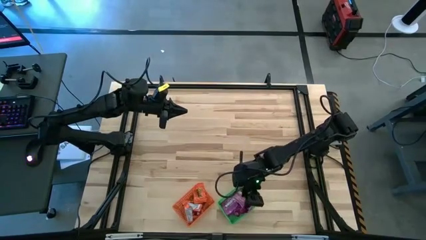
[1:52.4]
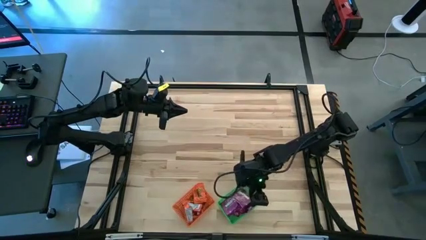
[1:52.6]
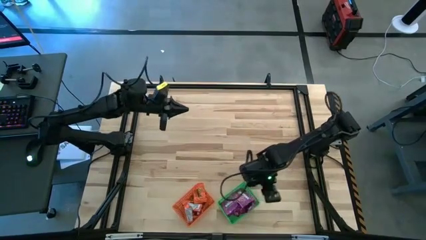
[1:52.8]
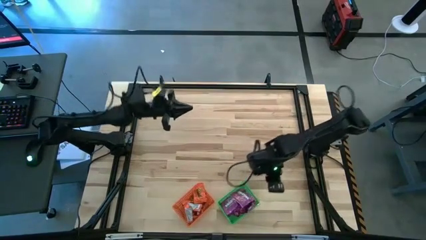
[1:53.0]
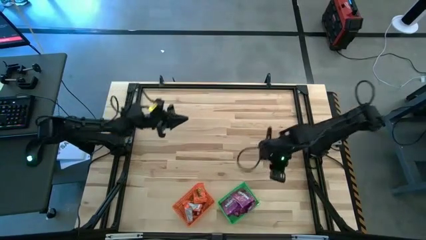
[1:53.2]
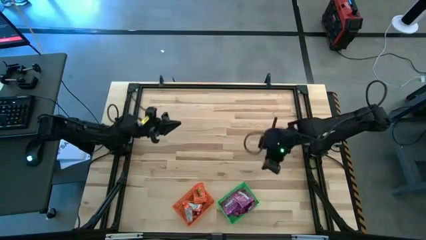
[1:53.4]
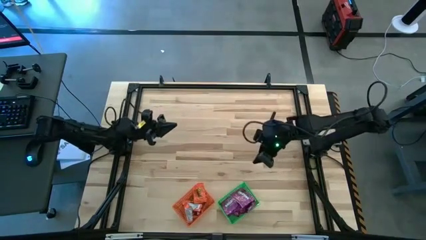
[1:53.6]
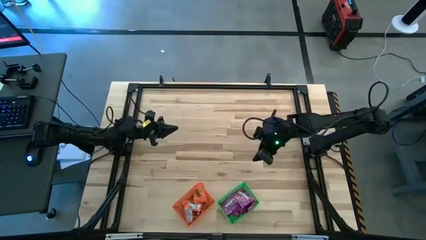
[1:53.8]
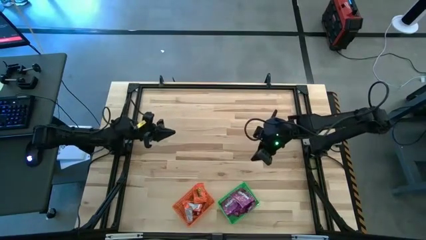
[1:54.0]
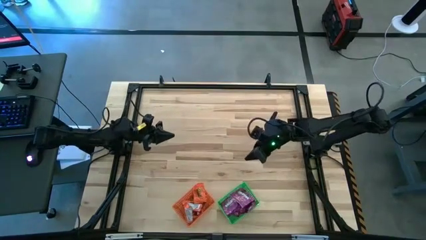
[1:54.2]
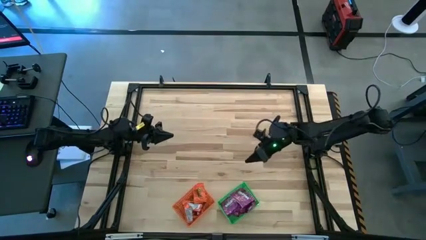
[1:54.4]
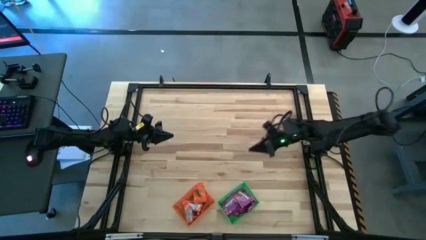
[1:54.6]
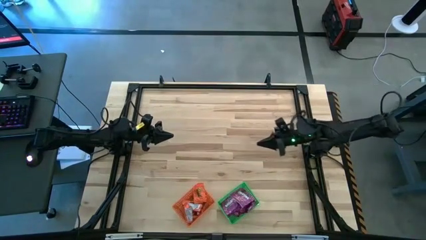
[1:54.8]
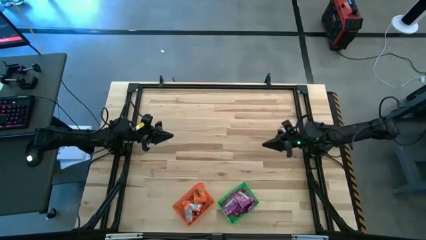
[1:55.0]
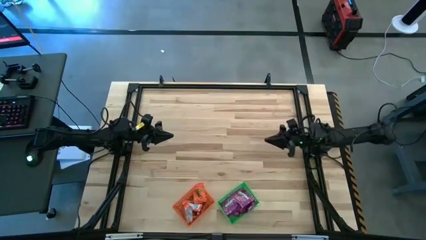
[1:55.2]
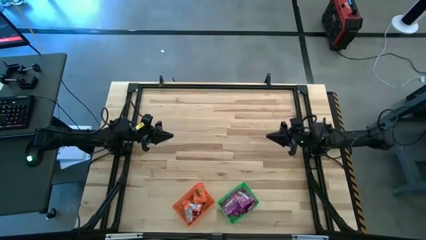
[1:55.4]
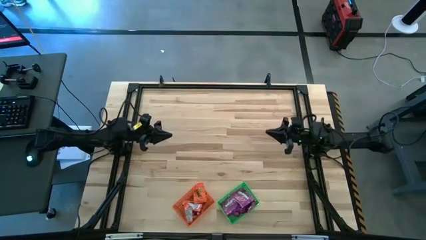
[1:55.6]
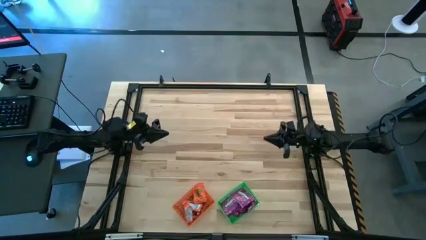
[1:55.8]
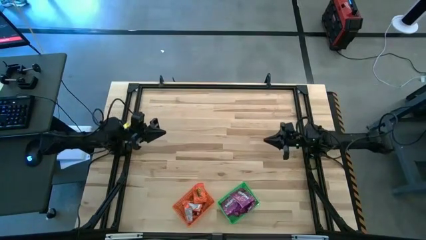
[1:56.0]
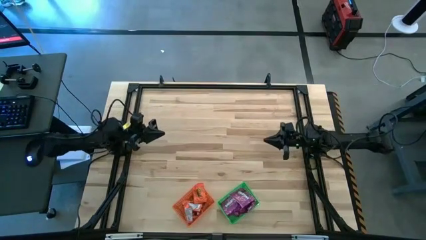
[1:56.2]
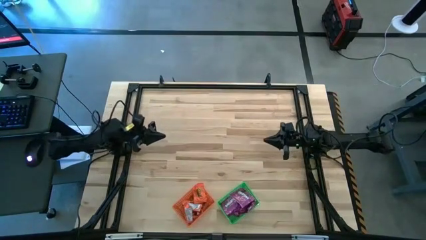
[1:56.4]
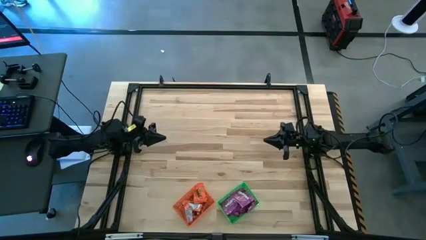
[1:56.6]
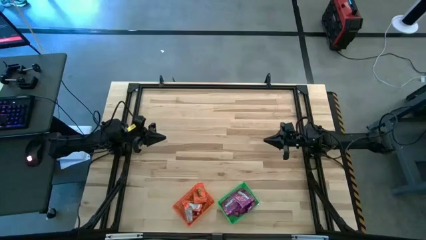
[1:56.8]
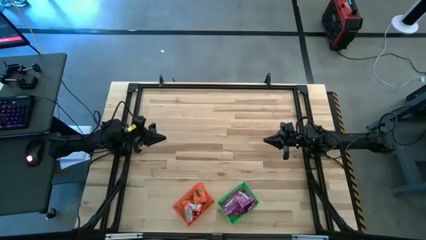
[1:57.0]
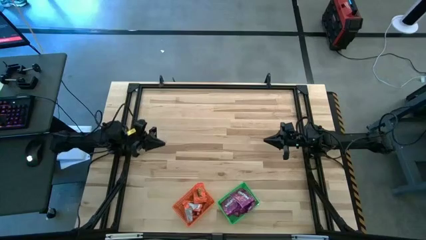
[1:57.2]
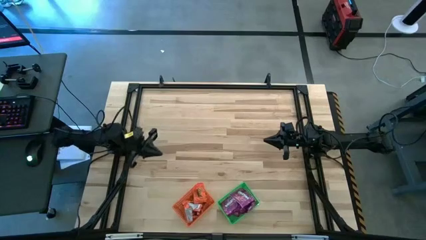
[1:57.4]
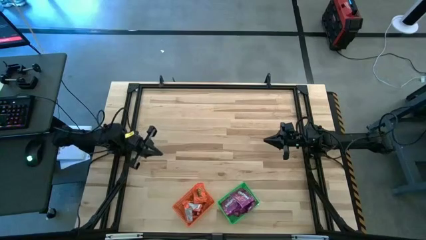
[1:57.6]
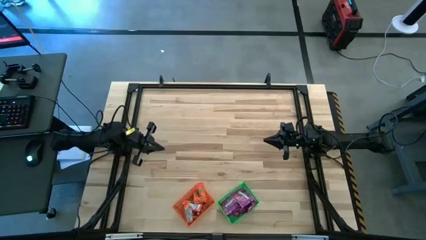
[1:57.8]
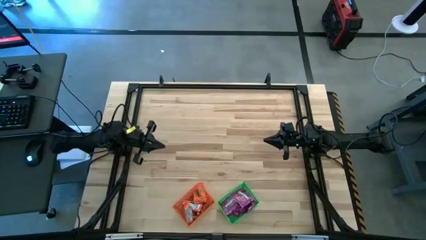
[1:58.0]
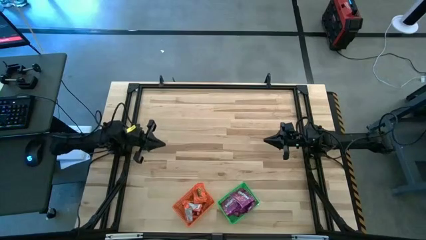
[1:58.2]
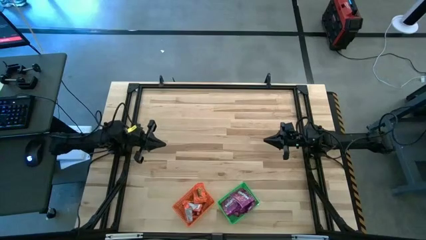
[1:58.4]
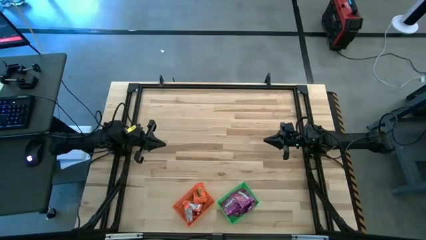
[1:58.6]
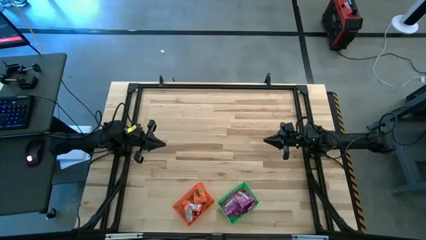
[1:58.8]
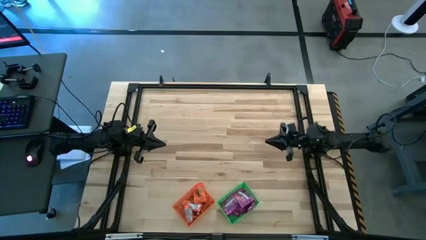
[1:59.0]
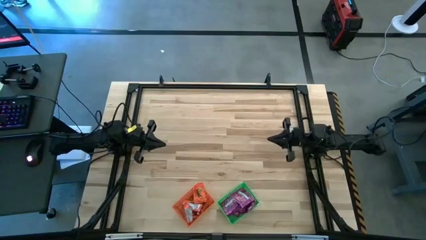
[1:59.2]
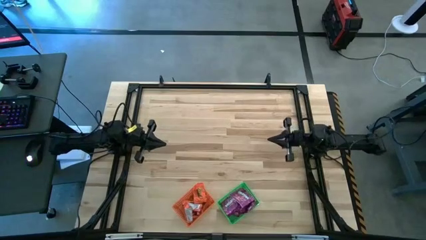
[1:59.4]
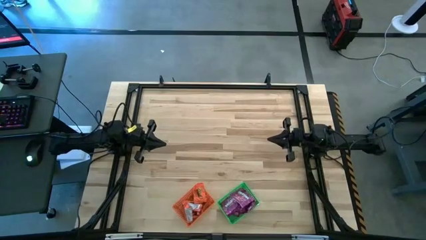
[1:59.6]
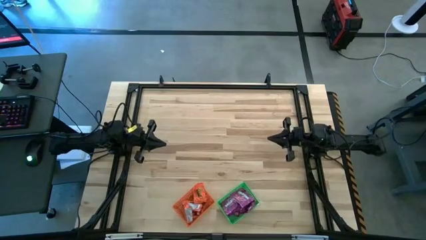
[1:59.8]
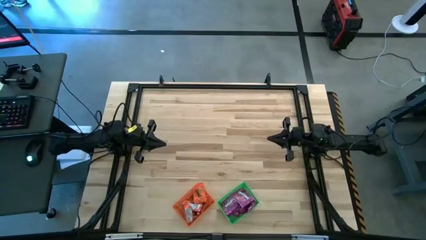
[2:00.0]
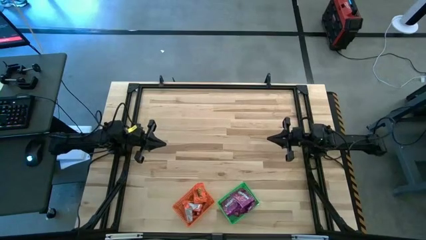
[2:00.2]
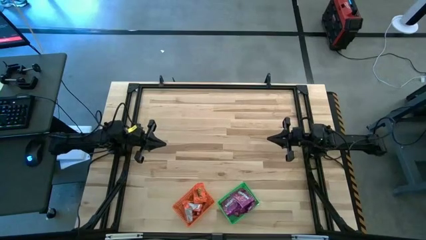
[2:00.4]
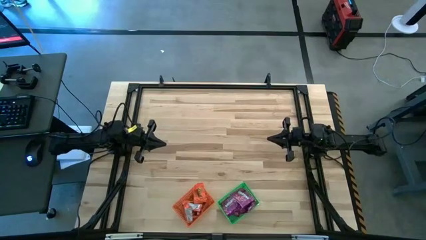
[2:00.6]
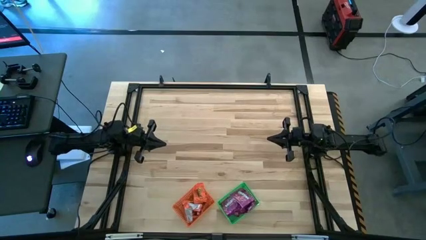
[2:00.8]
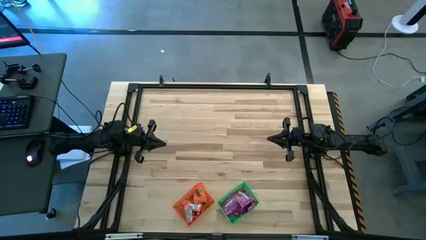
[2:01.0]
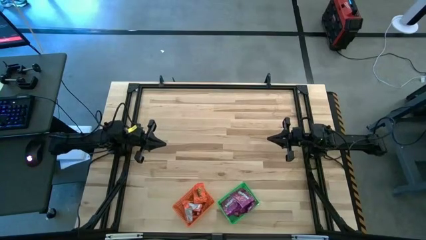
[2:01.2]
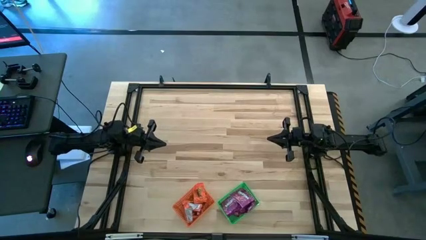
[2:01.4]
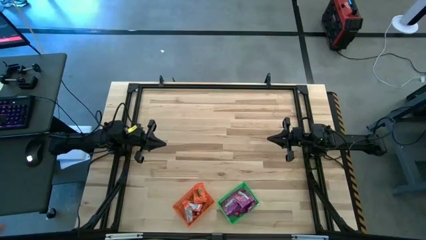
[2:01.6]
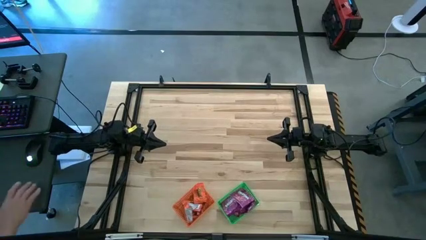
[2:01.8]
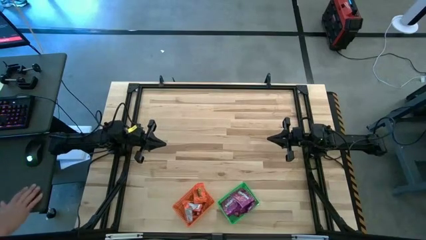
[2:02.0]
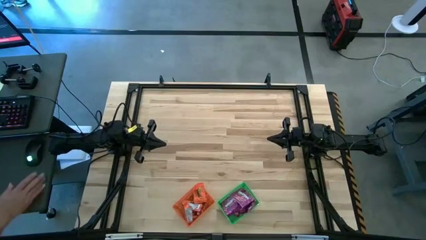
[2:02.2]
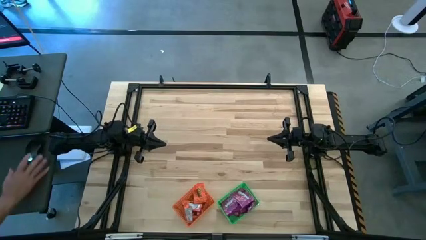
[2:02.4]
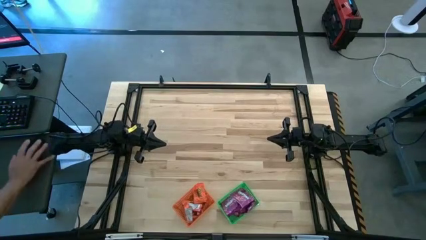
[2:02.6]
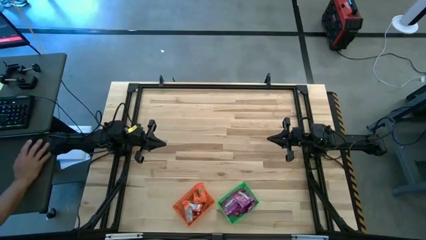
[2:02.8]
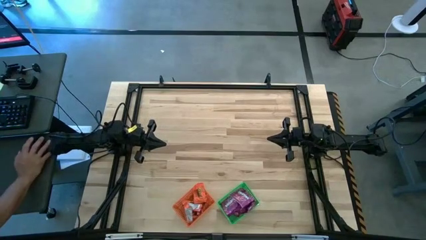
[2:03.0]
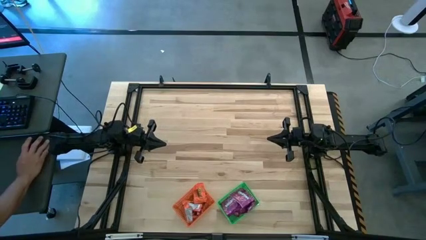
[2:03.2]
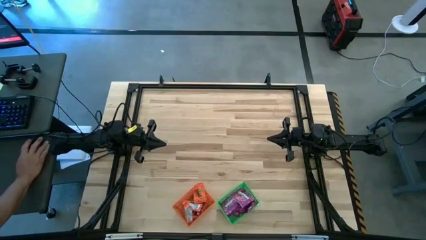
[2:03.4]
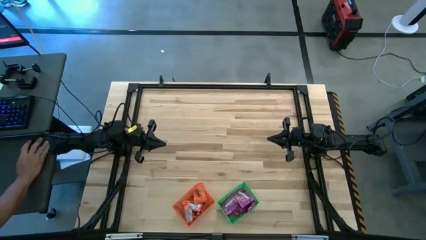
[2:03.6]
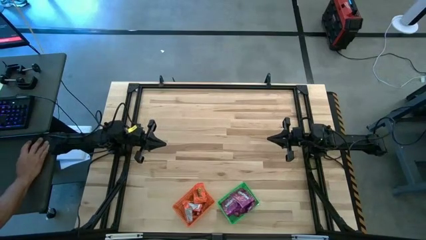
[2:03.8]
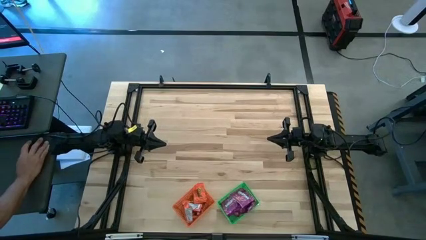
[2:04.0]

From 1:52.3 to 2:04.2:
Task: Sort candy by brand, put in halloween buckets
Return to Home Position

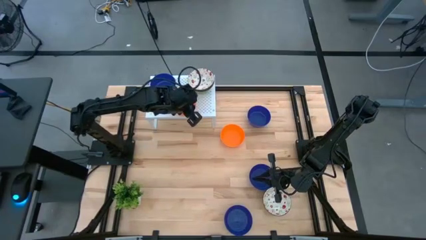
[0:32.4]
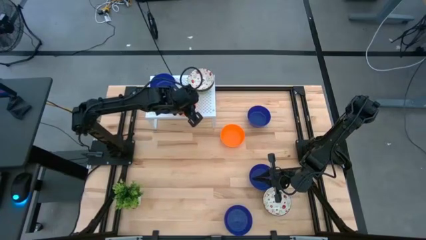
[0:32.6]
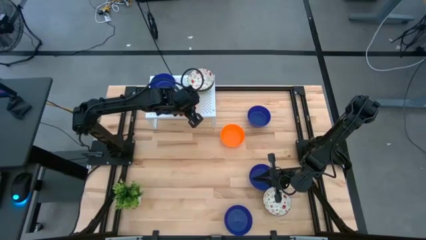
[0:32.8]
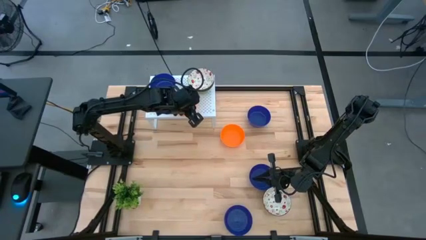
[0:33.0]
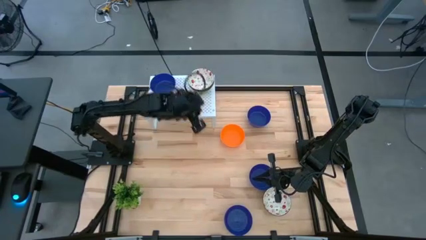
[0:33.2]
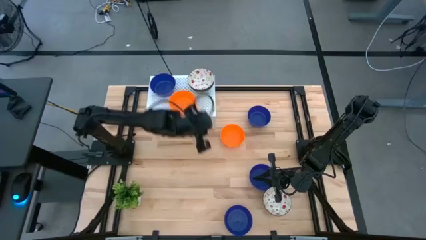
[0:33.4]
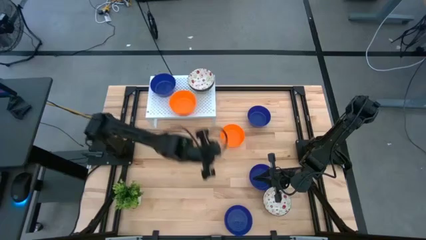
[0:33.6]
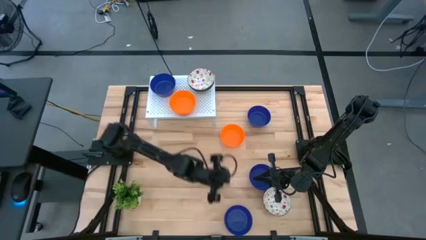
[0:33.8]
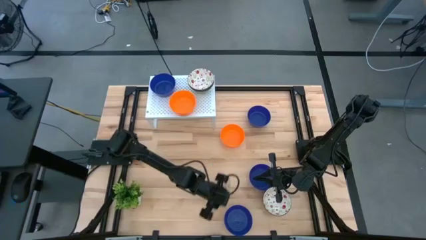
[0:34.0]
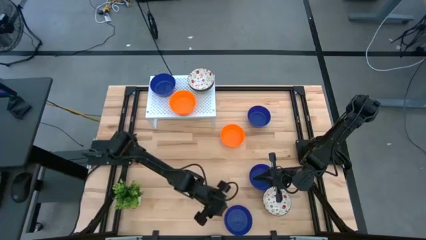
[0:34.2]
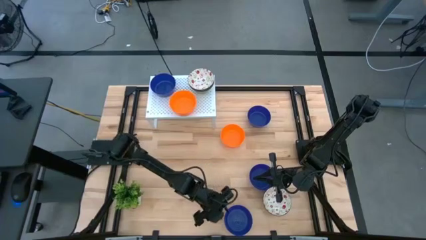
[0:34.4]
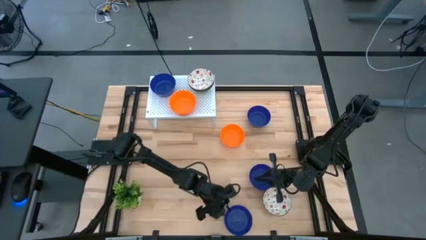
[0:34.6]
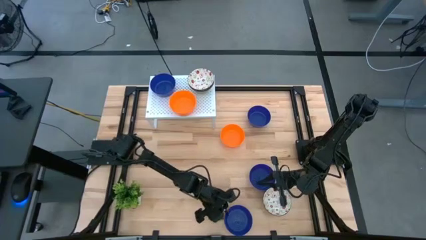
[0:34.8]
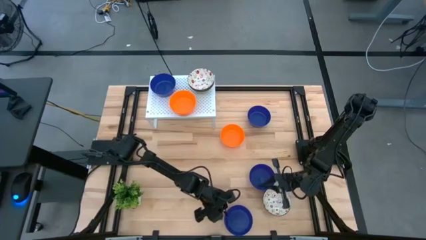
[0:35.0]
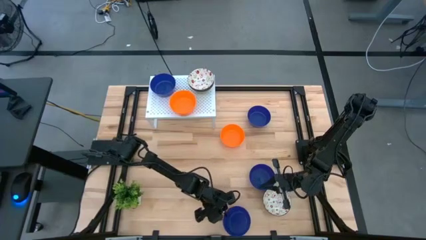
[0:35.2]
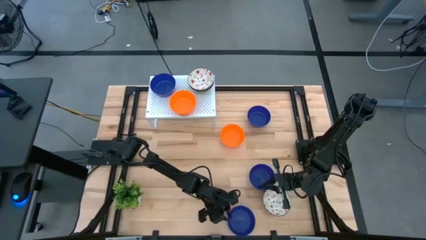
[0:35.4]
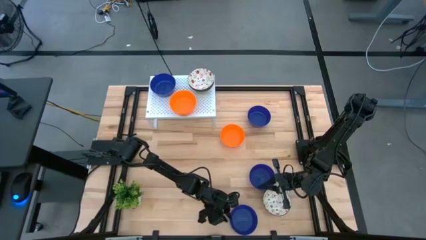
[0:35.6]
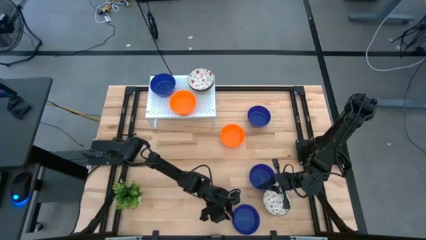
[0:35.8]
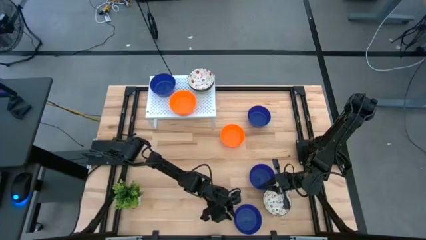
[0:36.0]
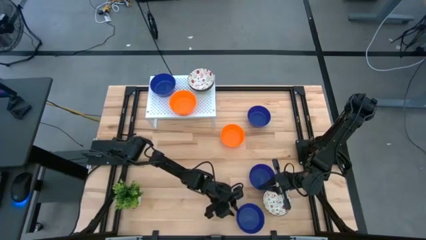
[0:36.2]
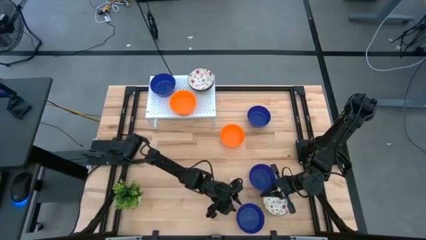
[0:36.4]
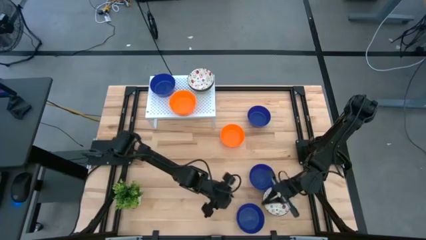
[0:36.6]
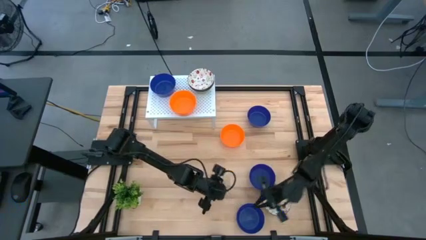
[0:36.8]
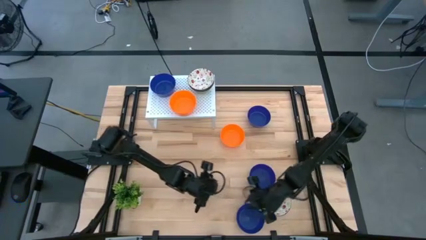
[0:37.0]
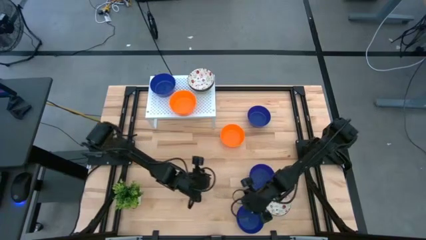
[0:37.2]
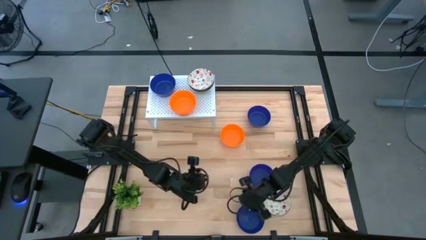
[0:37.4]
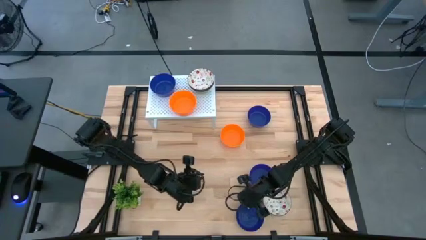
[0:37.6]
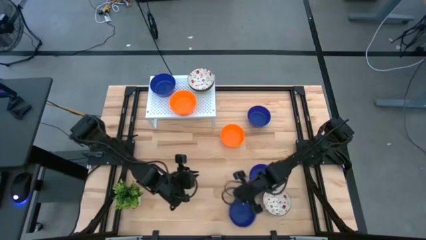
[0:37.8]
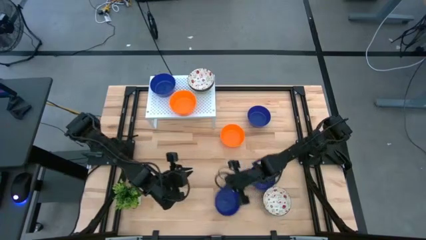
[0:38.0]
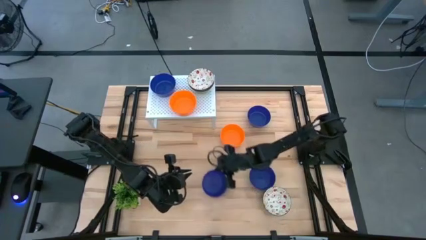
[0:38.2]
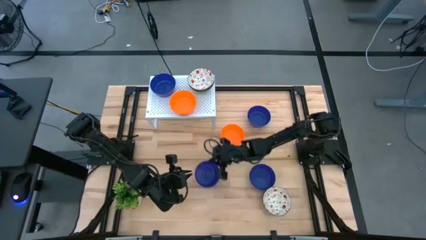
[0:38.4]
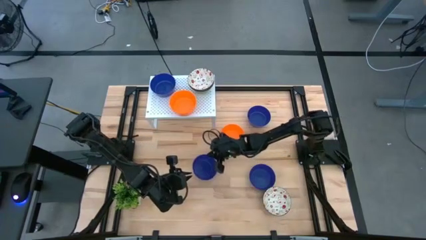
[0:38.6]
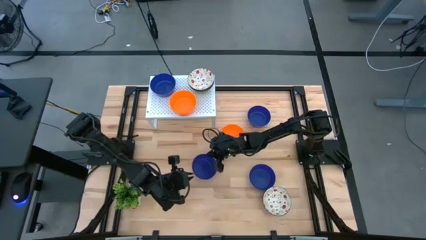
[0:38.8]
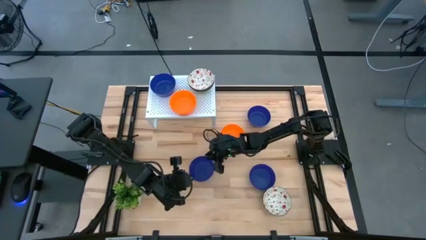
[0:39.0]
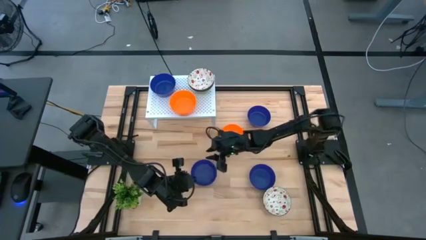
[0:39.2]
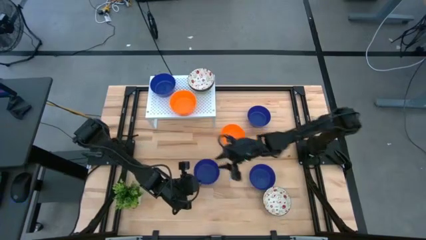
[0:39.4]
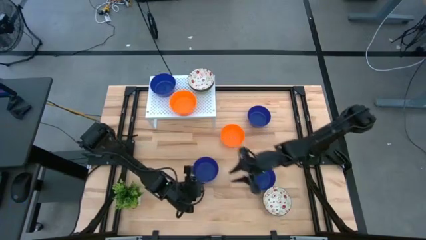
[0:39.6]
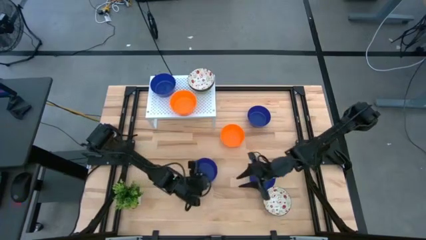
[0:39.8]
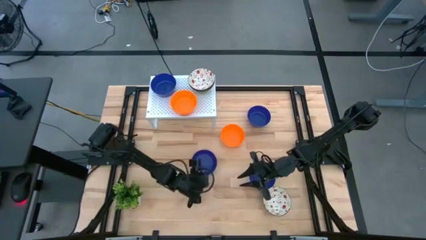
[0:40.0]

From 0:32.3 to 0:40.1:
Task: Pick & Place Mini bowls
Stack the blue bowl on top of the blue bowl on the shelf
